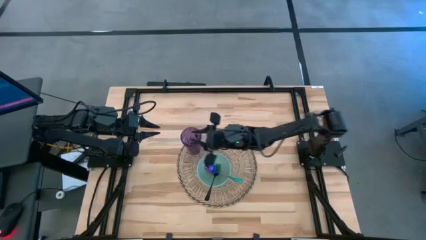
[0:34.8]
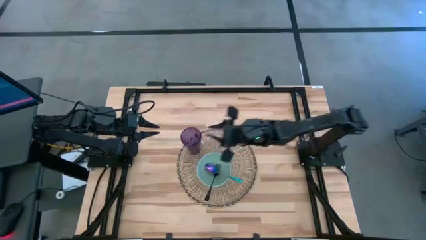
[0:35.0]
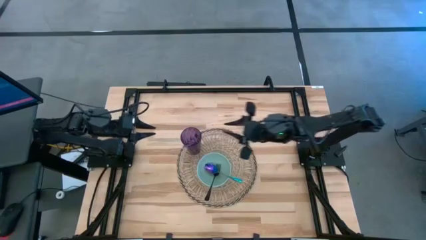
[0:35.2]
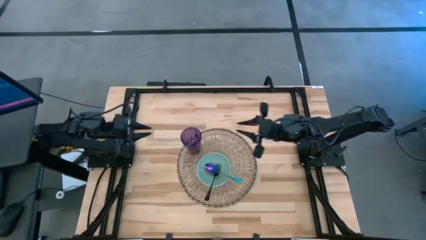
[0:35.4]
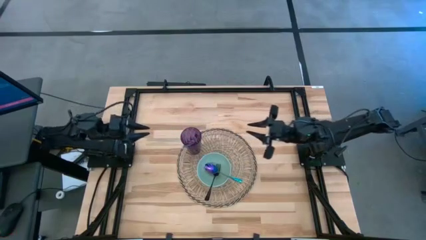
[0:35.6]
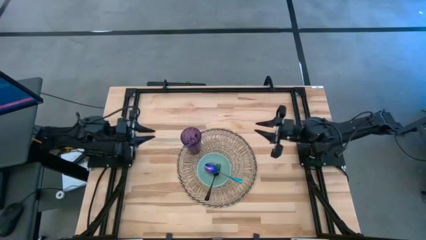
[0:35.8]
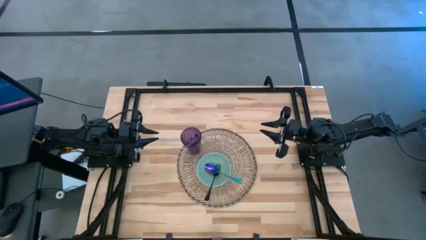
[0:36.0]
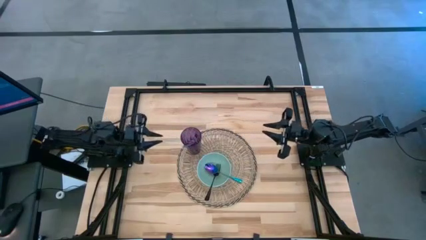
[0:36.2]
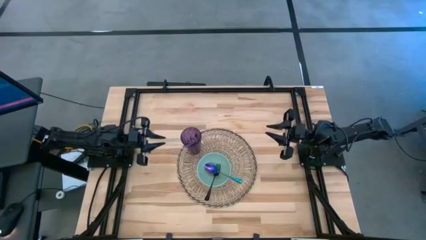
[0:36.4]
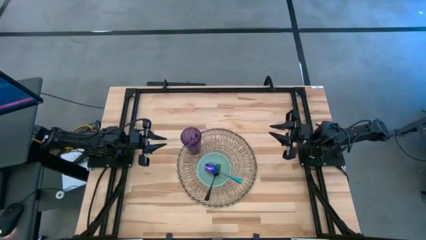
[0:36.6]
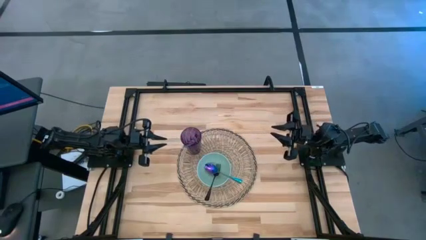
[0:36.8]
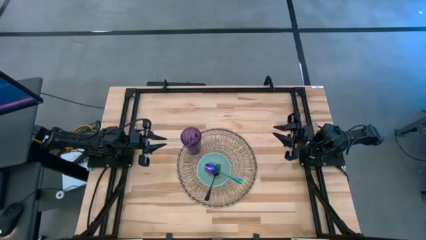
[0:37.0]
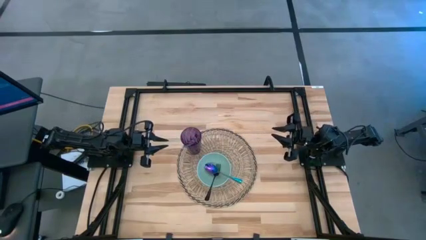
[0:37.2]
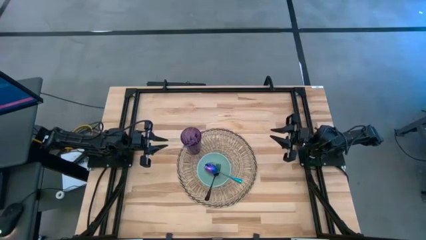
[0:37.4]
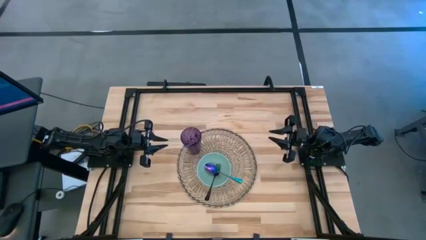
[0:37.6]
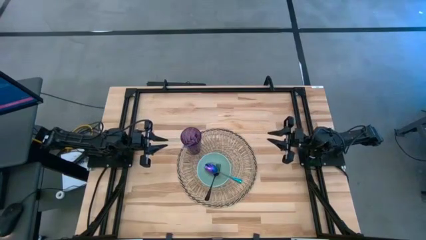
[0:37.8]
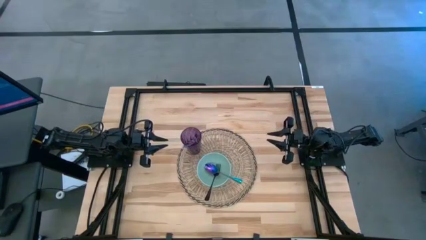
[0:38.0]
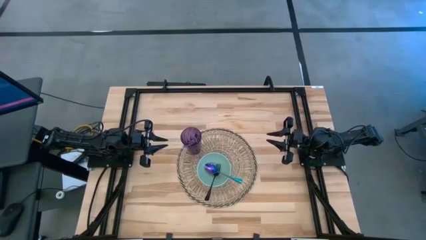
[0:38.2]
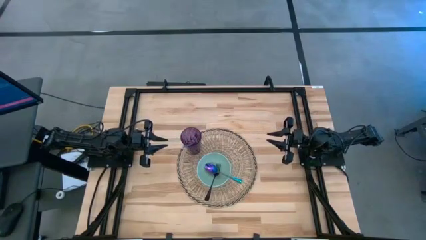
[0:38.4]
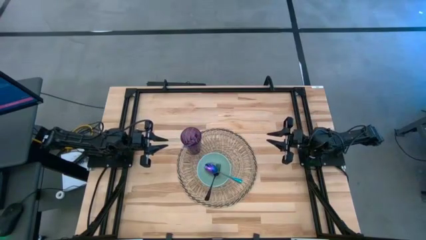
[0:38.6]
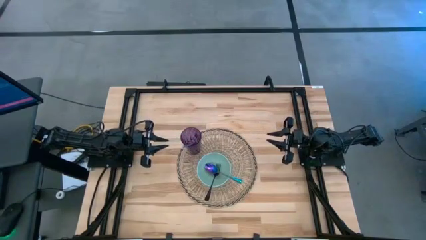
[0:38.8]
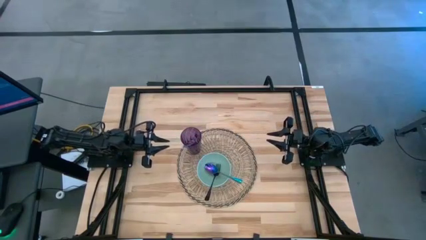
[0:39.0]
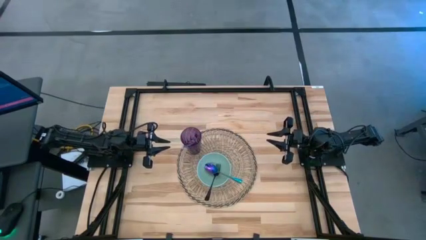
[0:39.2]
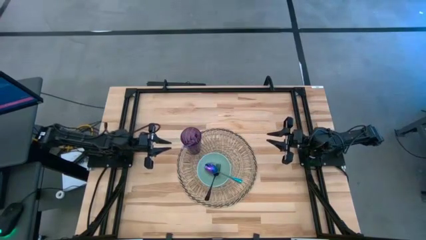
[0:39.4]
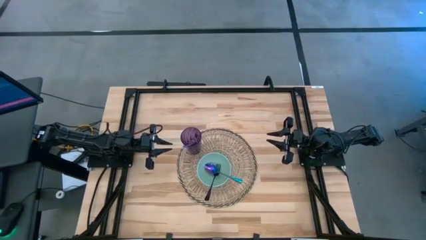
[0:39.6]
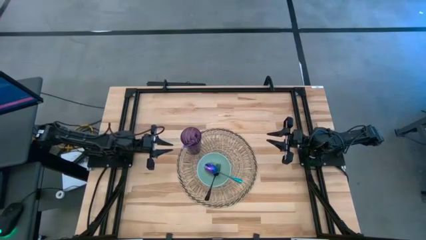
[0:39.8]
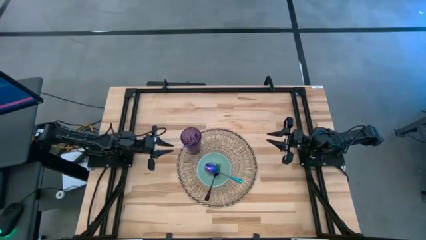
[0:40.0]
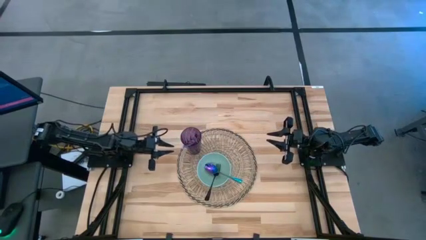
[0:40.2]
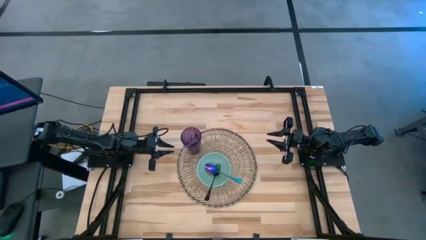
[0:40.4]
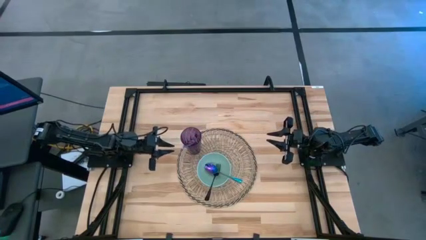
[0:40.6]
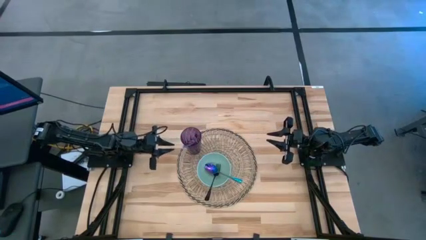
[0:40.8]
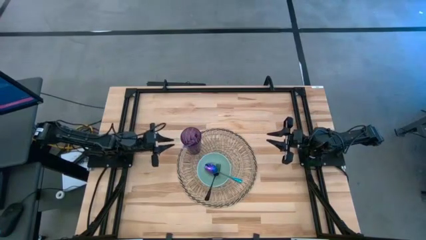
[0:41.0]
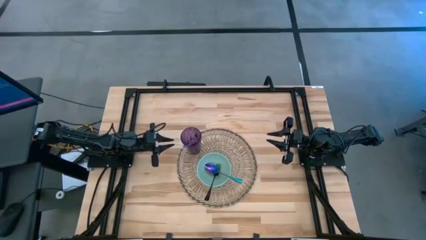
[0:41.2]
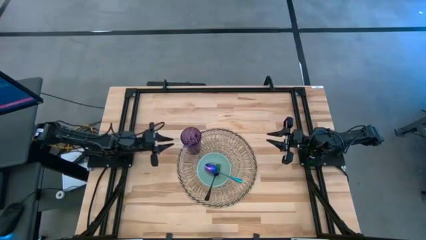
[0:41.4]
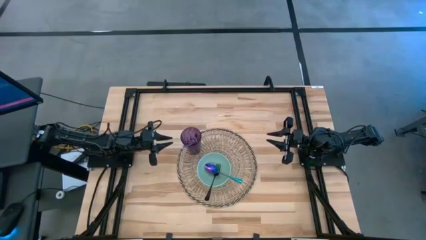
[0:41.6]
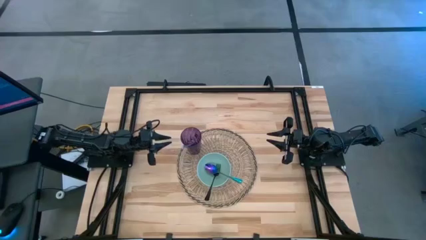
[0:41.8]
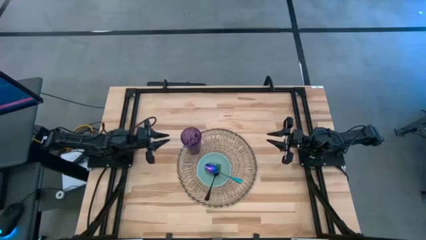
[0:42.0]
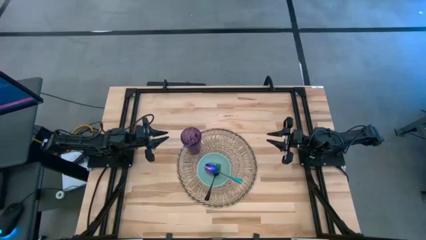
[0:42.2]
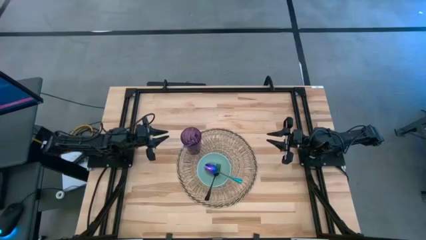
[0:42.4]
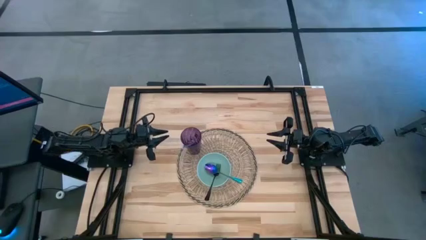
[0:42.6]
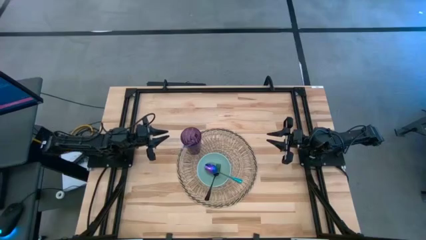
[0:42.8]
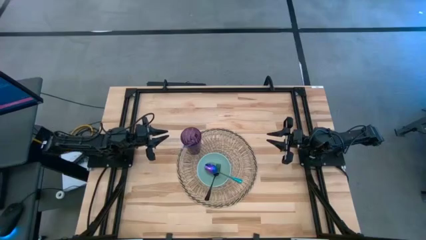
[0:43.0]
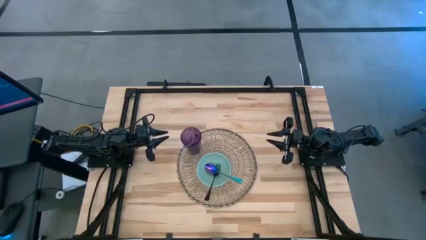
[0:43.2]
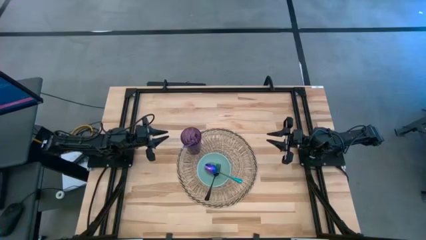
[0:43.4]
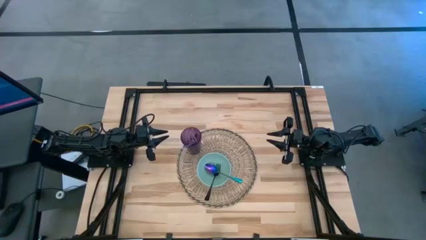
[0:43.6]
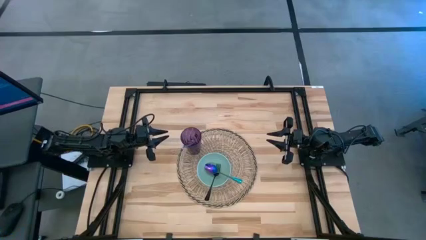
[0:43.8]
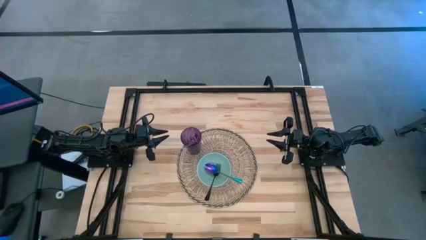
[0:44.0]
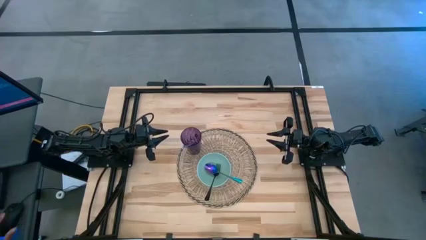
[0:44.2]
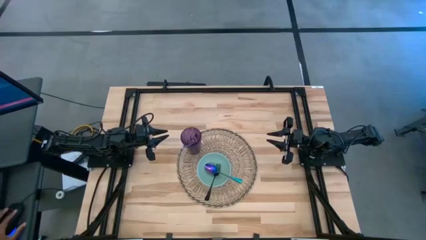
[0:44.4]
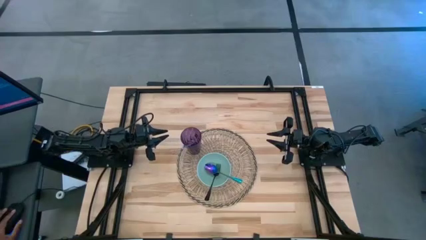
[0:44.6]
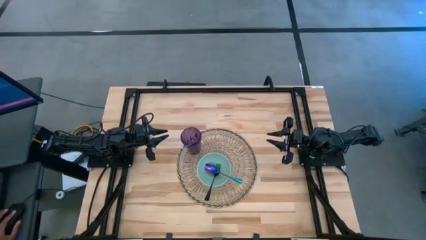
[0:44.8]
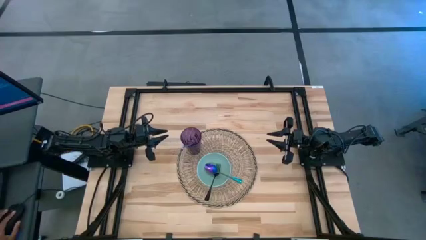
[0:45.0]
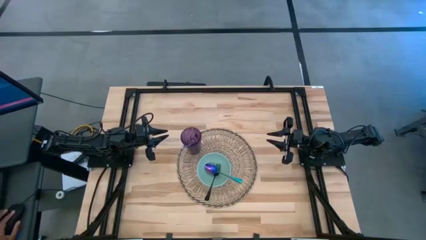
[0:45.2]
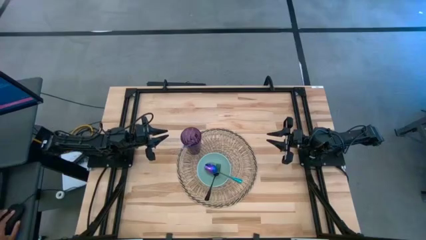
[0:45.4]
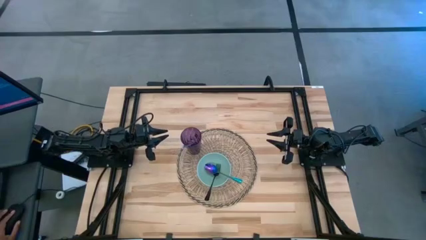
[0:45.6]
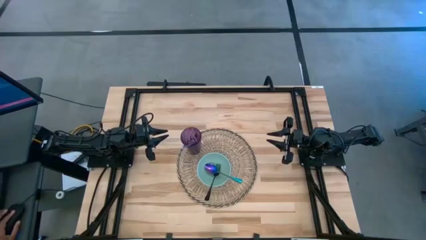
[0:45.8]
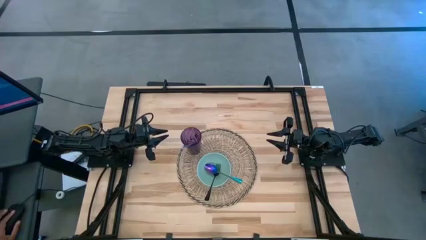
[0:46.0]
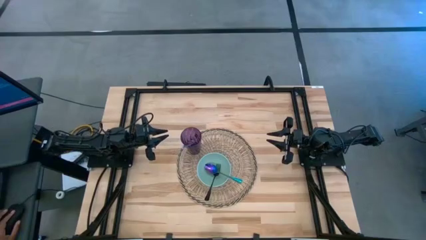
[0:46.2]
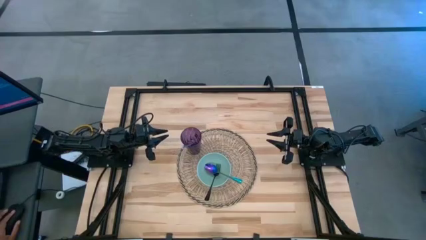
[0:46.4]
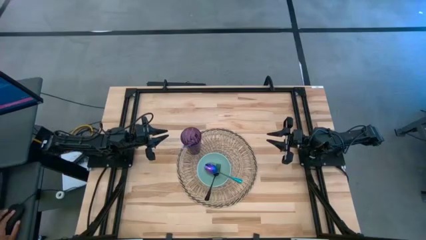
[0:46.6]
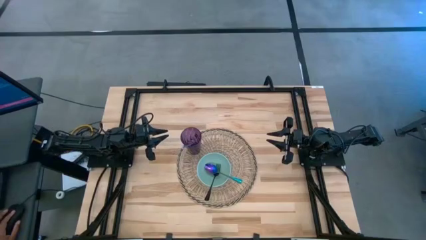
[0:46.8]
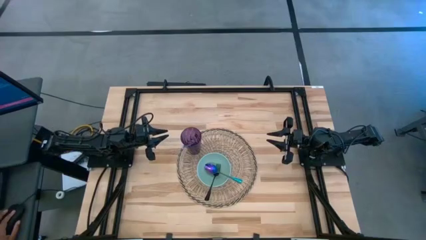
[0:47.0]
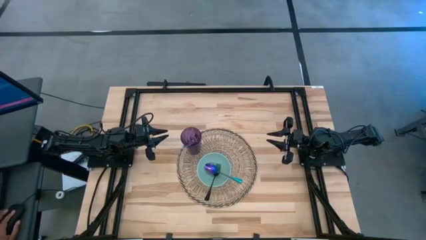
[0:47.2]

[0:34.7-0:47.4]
Task: Pick & Place Utensil
Return to Home Position
